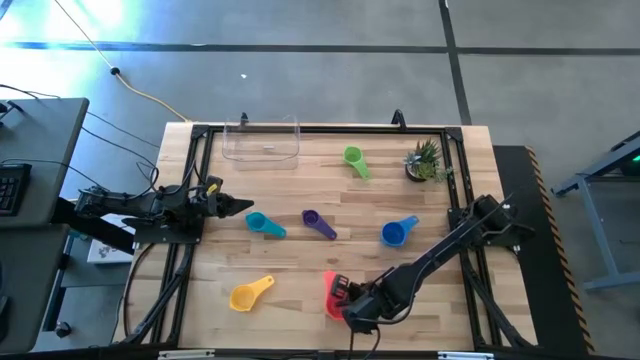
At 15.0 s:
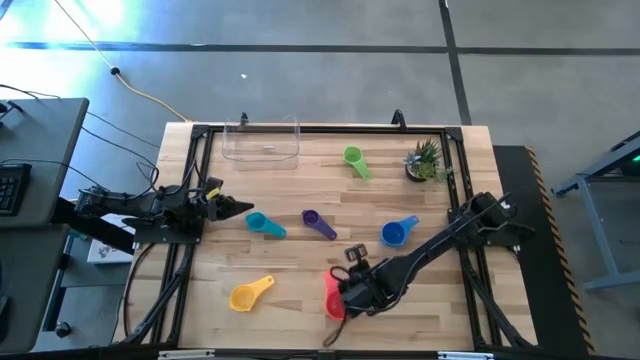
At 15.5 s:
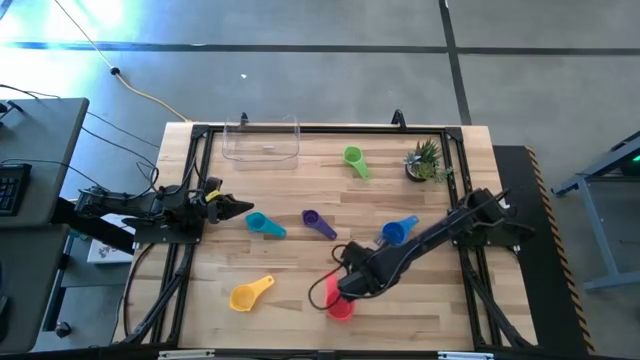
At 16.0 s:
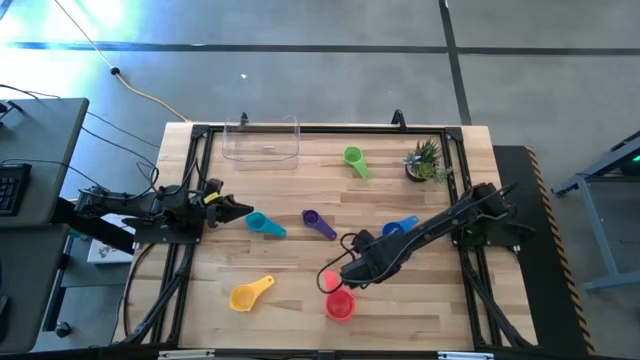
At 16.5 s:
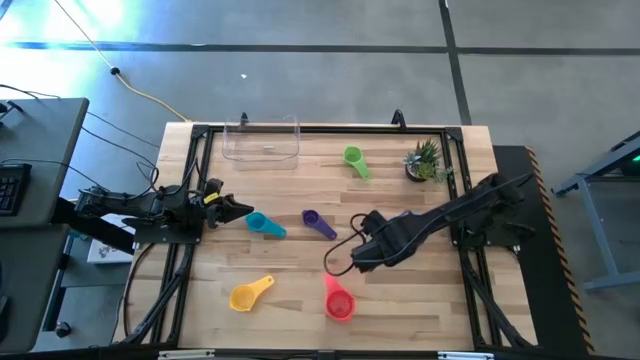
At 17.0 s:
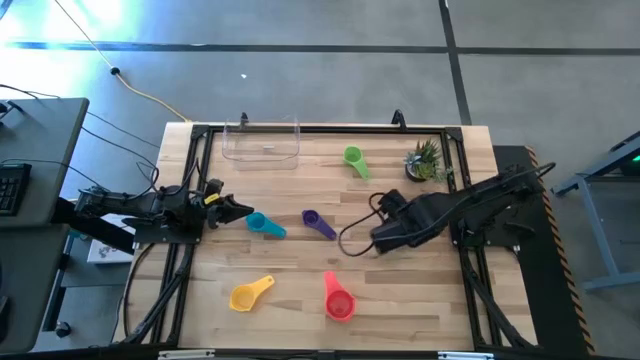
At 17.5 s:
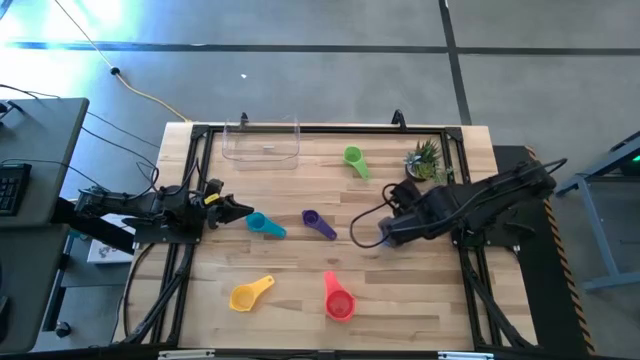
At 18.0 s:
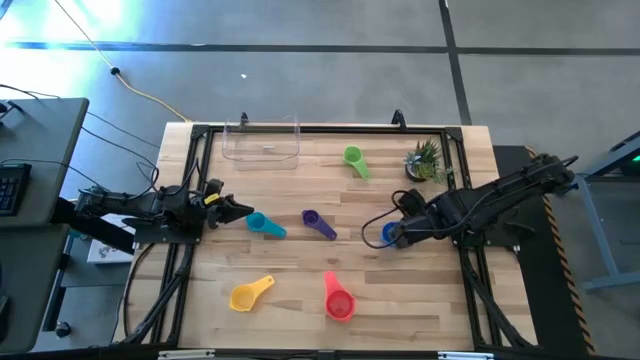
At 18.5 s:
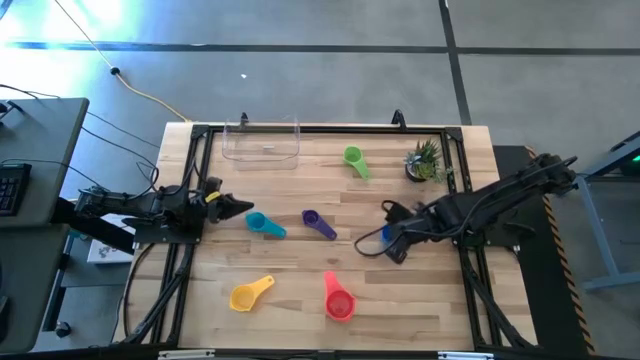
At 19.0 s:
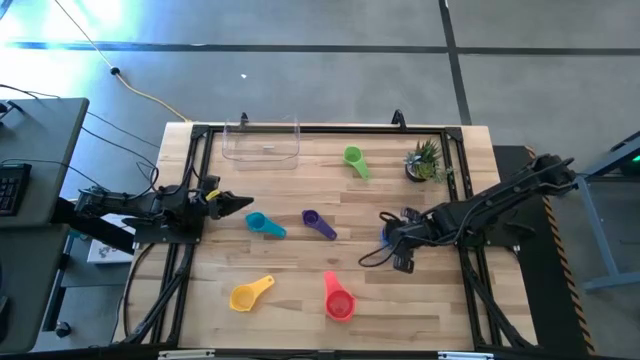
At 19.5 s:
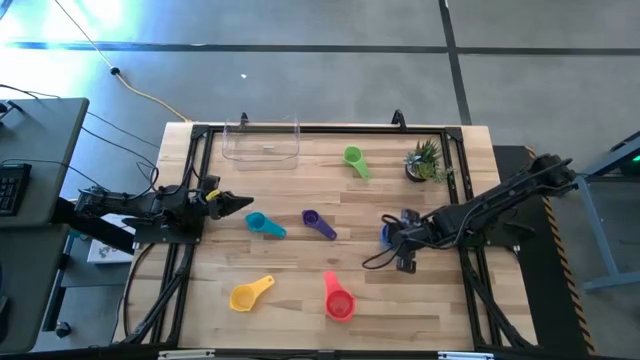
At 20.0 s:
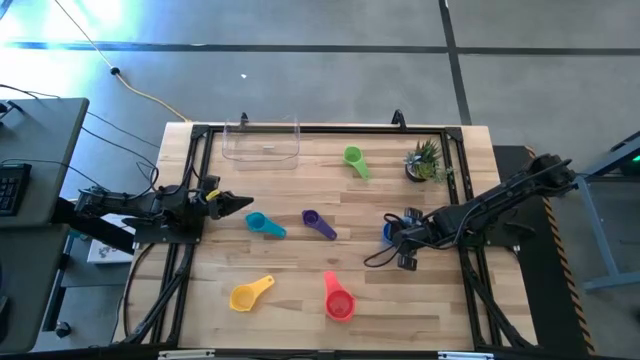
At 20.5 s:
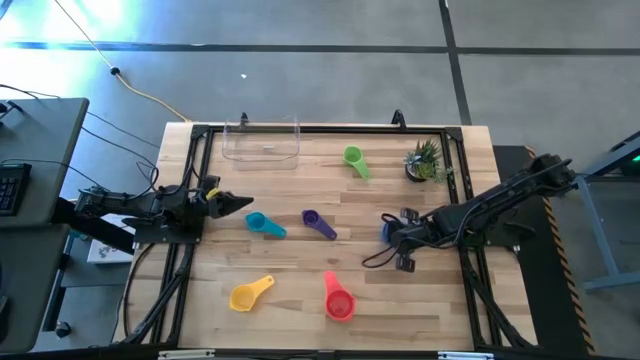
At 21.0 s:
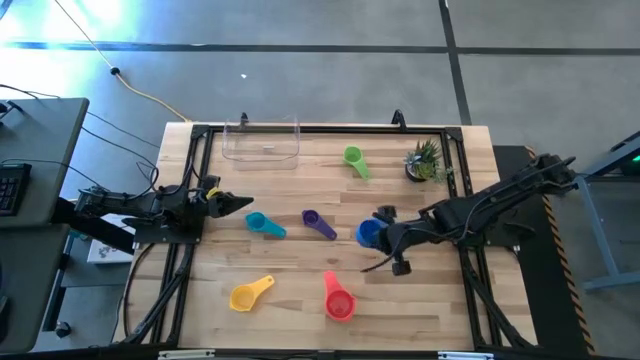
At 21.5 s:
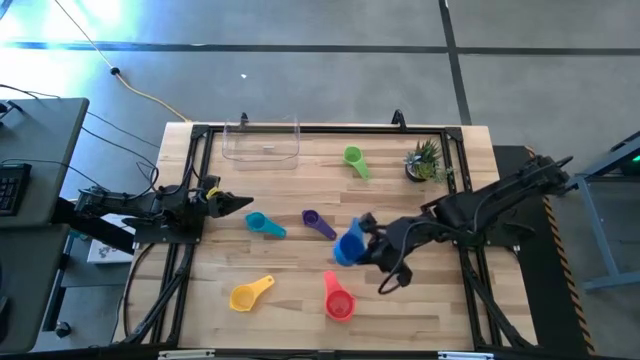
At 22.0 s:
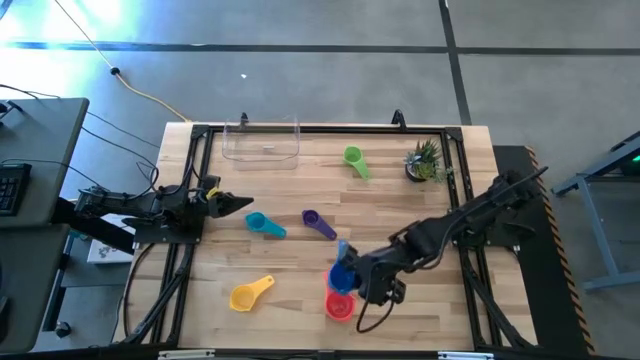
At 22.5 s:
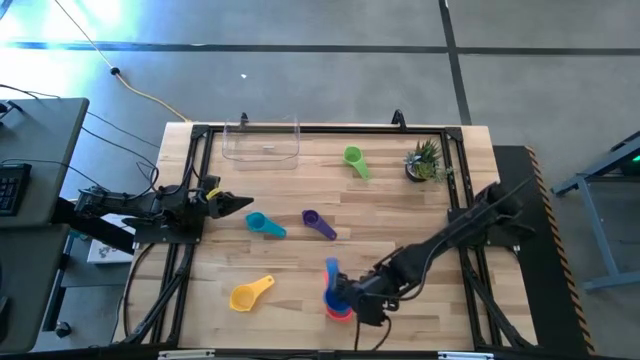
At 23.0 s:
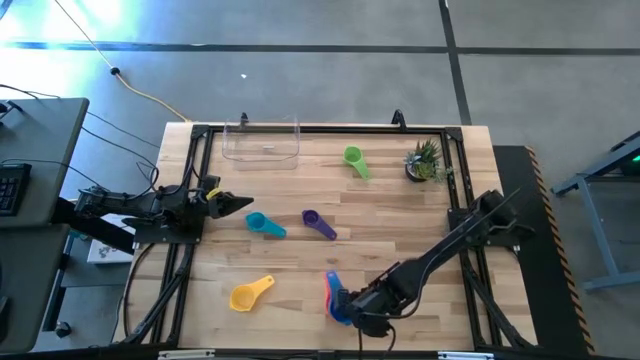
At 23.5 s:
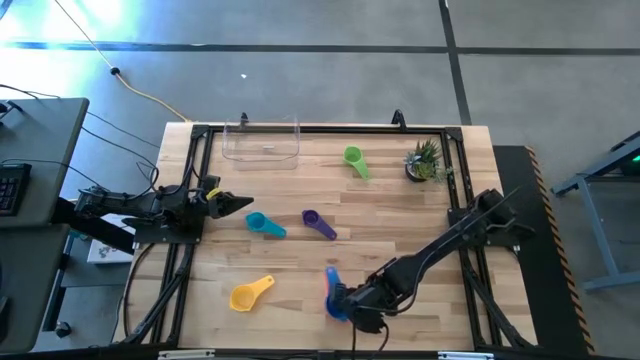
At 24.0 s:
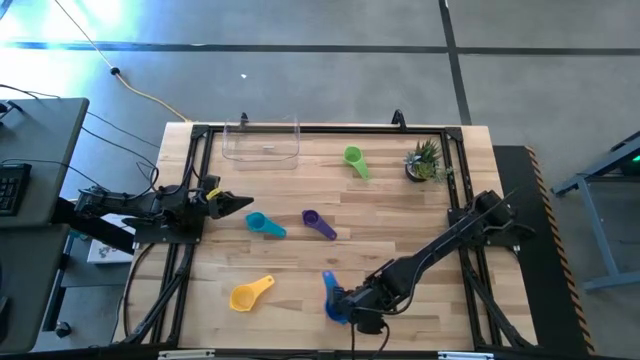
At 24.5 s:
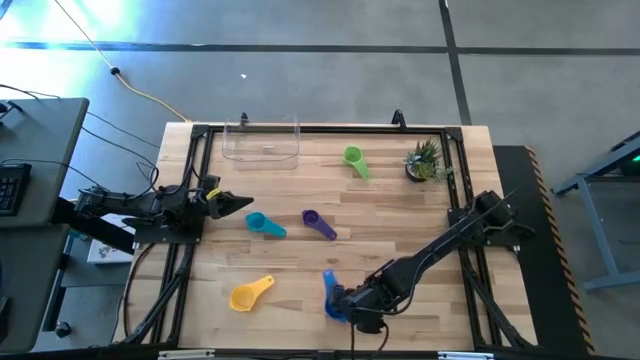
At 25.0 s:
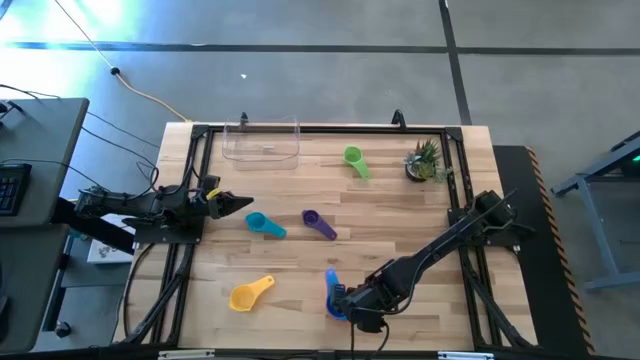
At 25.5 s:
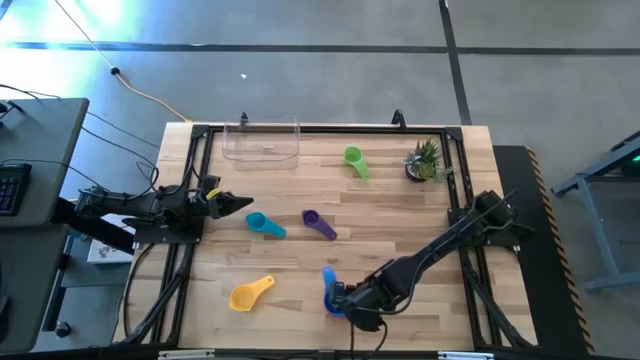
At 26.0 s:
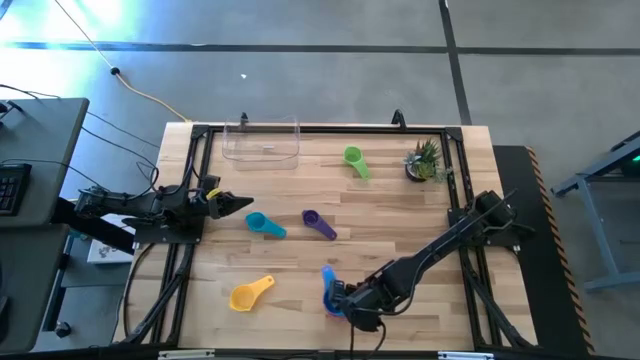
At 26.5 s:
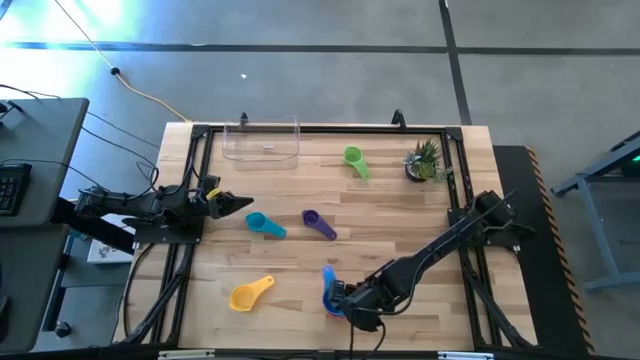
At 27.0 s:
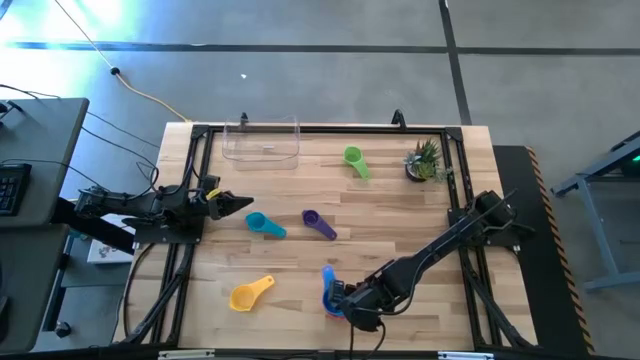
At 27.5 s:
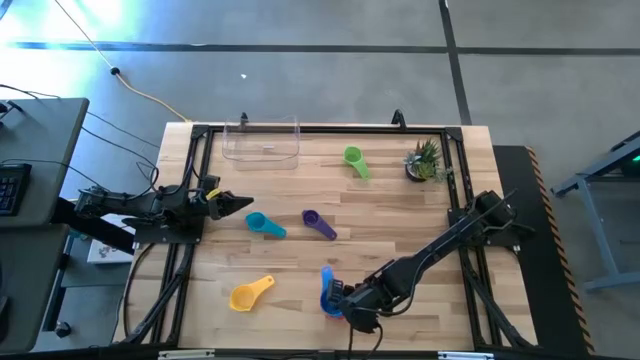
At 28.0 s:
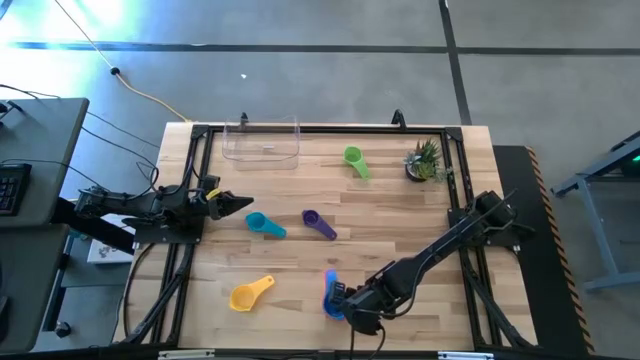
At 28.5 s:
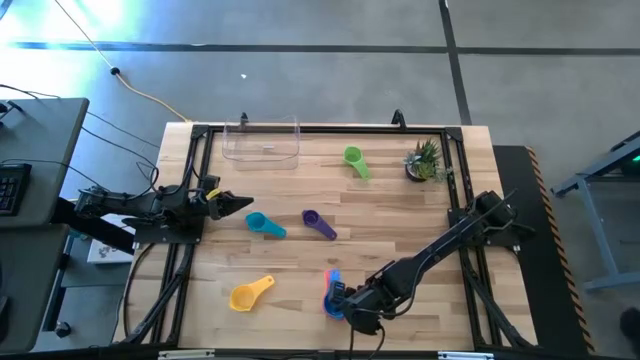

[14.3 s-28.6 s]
Task: Nest measuring cups in basket
Stack the blue measuring cup on the red measuring cup

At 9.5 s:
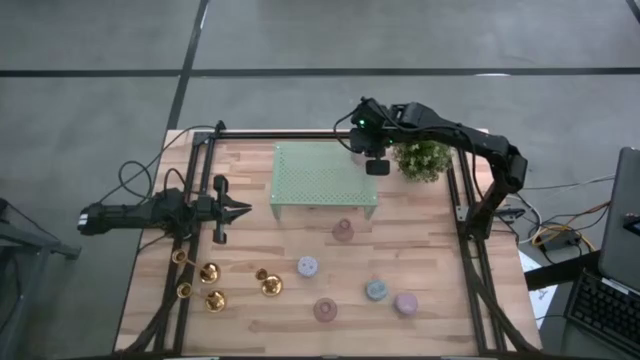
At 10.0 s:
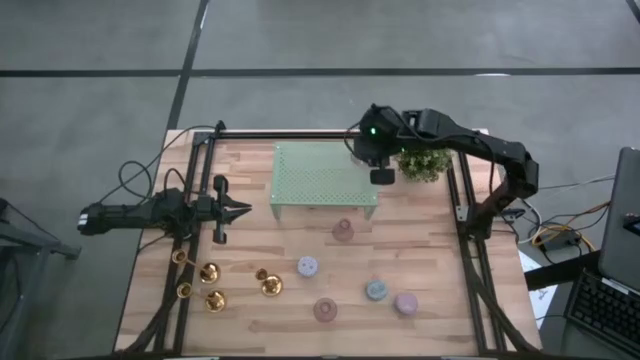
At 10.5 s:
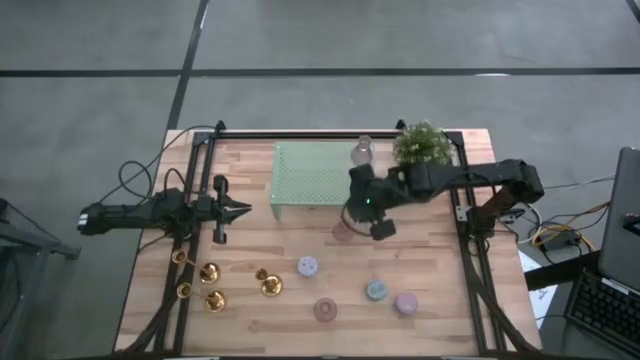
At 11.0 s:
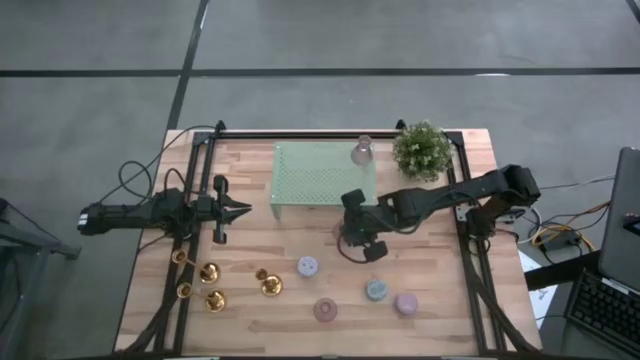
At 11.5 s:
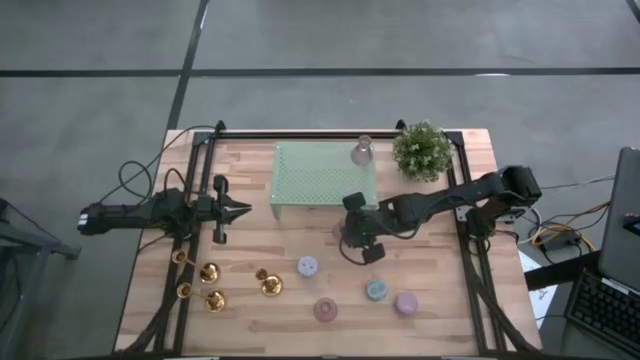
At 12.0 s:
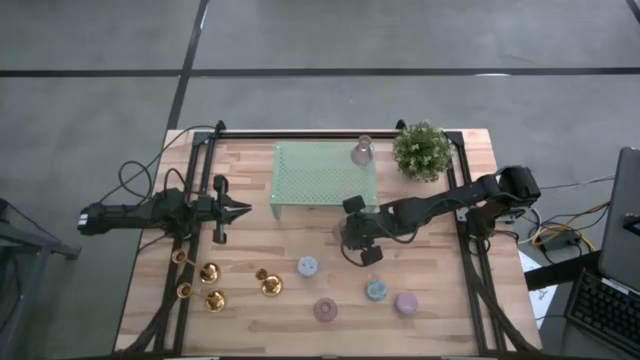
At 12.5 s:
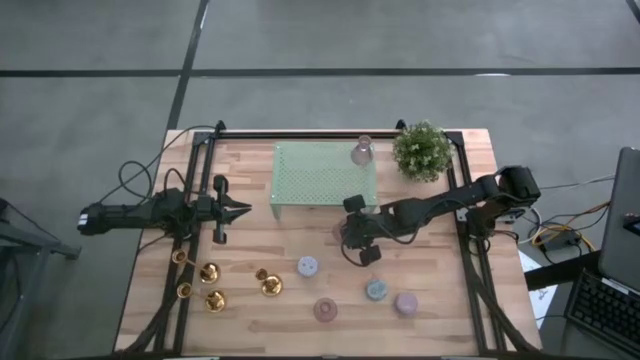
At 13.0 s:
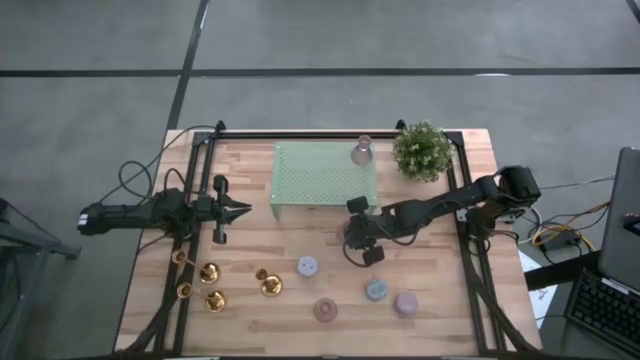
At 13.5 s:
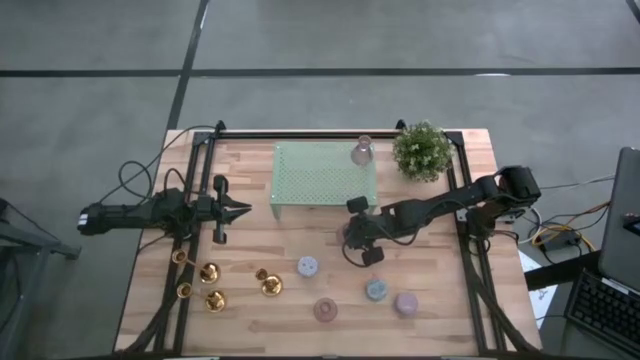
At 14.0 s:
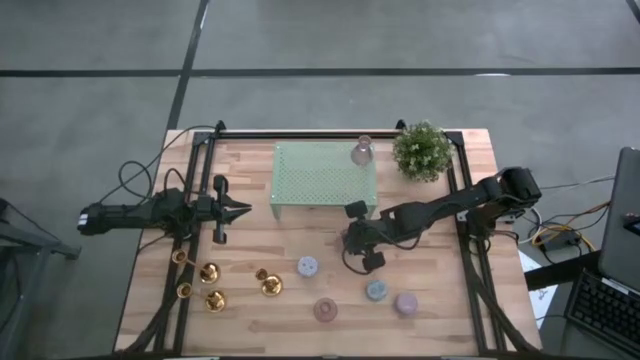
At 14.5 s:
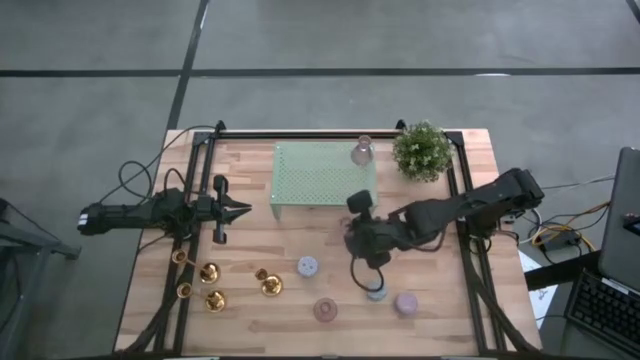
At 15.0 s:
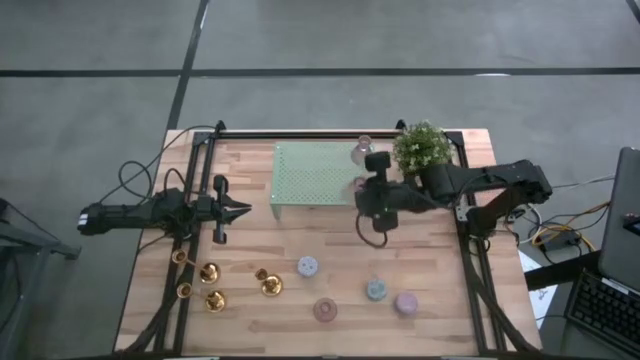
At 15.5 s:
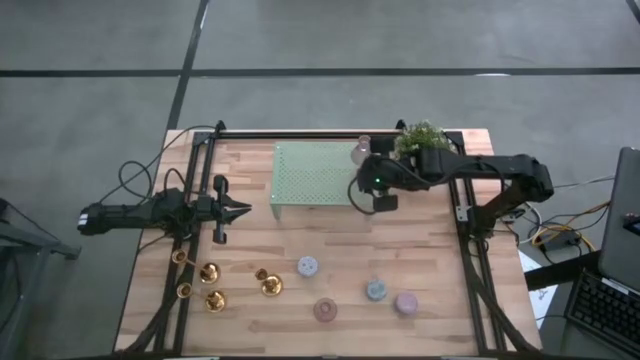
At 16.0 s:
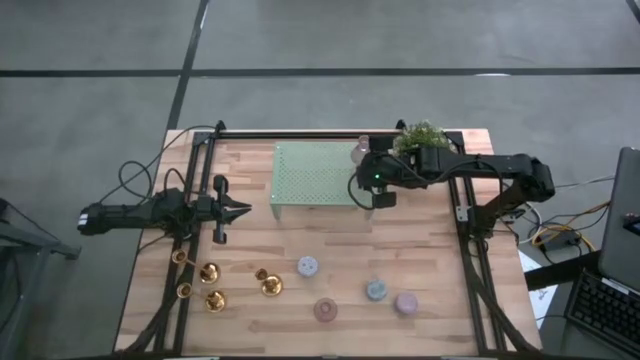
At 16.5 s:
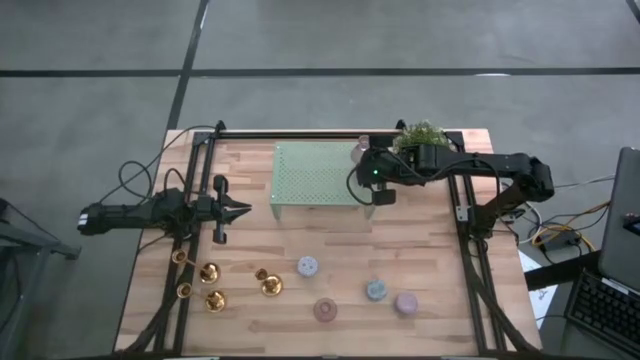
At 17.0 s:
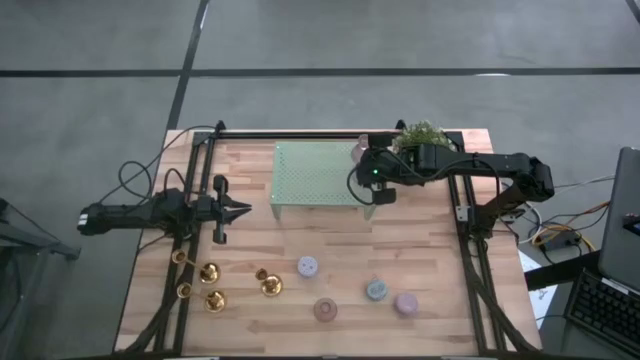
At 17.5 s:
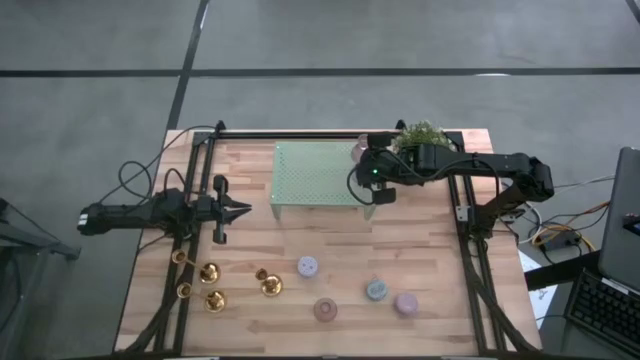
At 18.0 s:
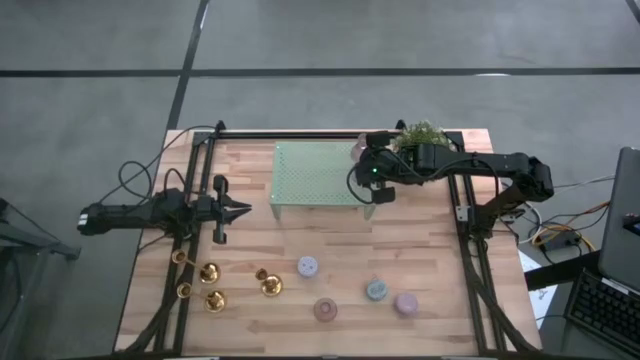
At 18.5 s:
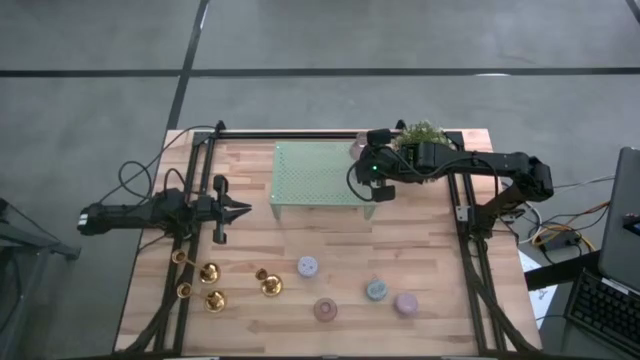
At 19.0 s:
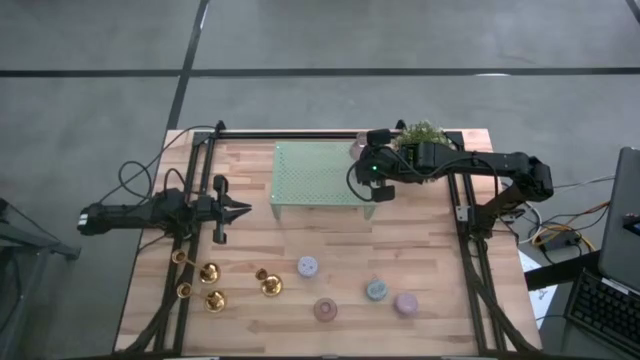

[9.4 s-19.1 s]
Task: Pick & Place candle stick holders
Put the top pink candle holder on the shelf aligned with the other pink candle holder
